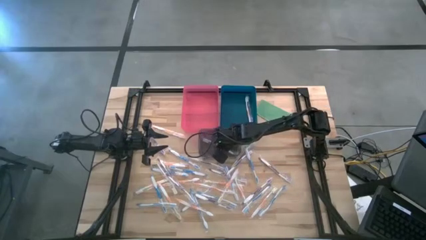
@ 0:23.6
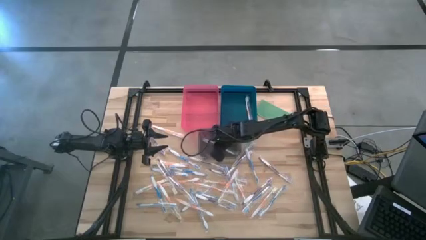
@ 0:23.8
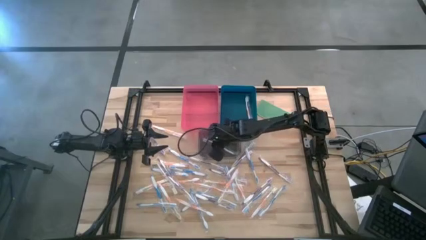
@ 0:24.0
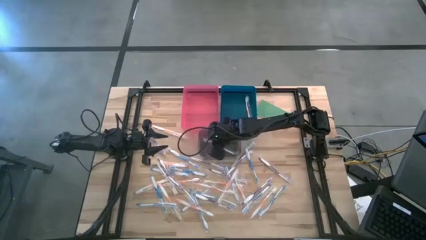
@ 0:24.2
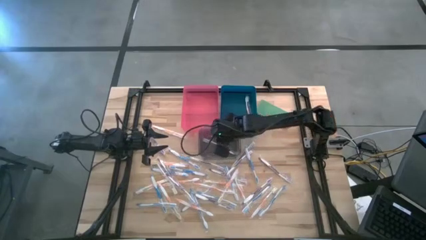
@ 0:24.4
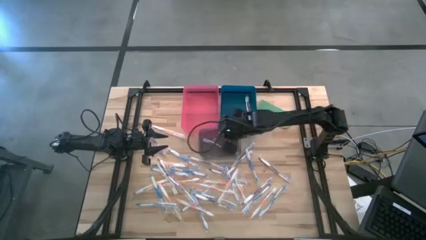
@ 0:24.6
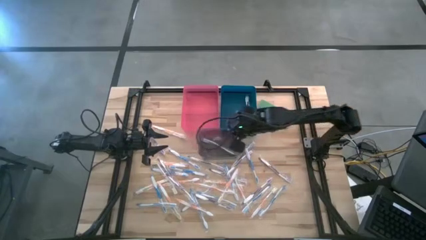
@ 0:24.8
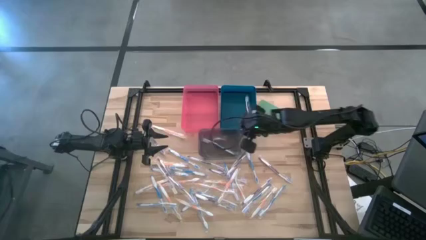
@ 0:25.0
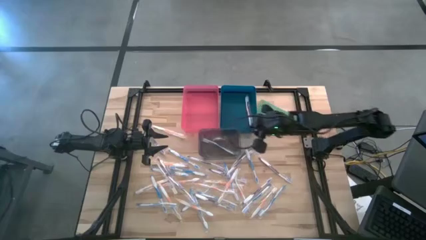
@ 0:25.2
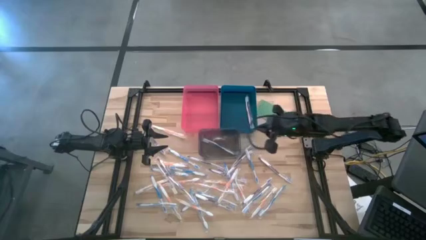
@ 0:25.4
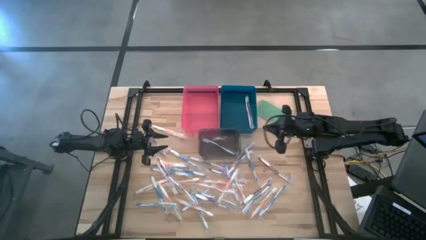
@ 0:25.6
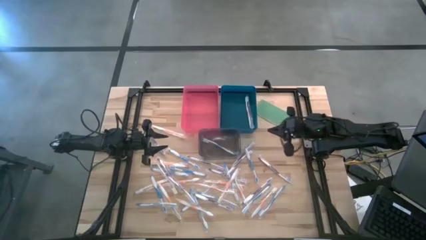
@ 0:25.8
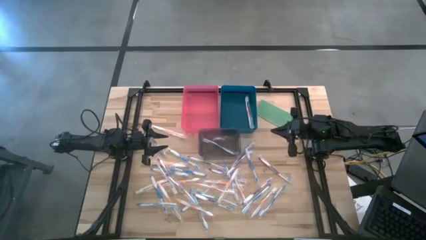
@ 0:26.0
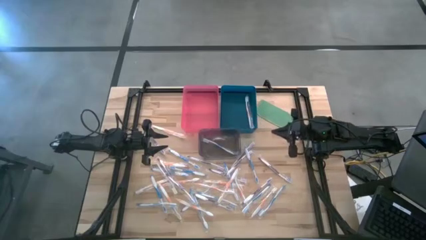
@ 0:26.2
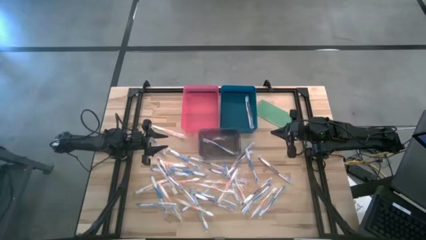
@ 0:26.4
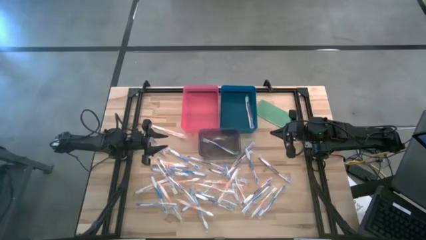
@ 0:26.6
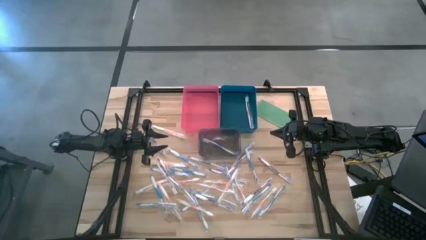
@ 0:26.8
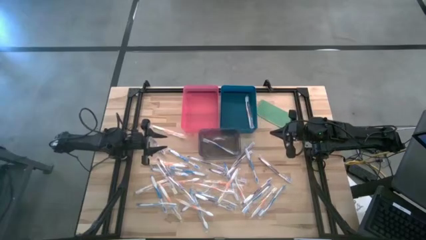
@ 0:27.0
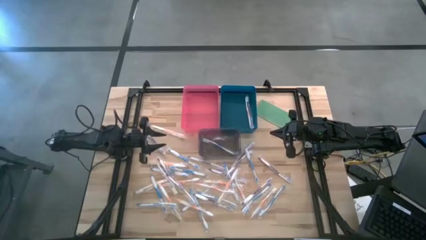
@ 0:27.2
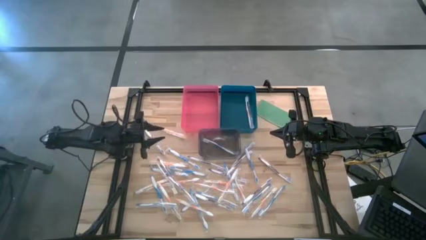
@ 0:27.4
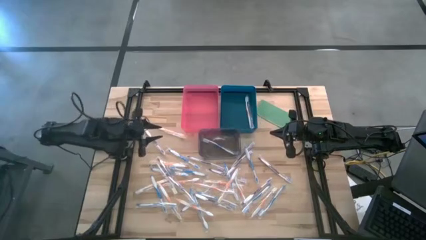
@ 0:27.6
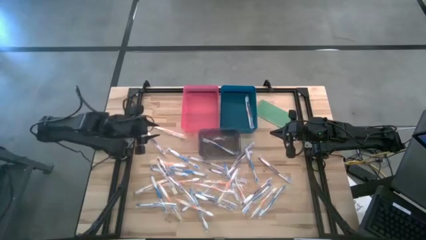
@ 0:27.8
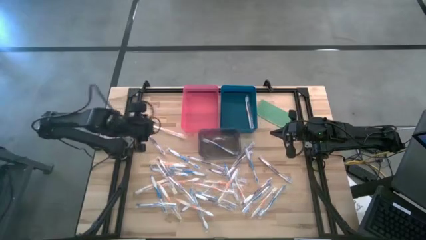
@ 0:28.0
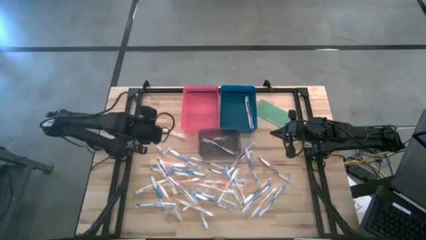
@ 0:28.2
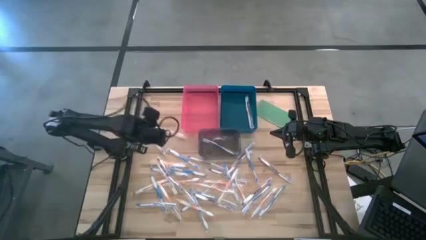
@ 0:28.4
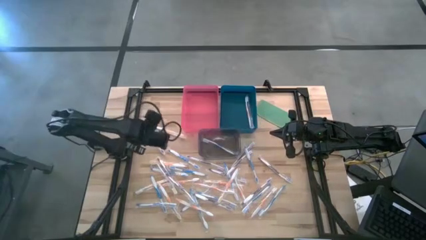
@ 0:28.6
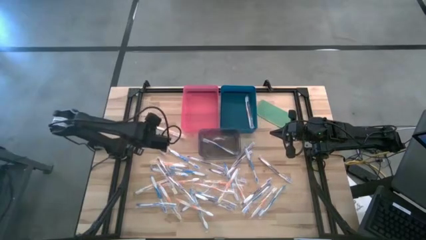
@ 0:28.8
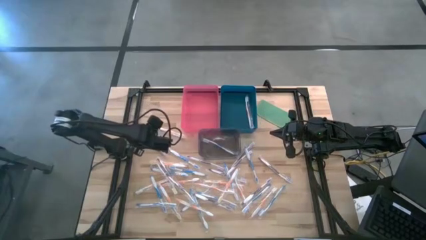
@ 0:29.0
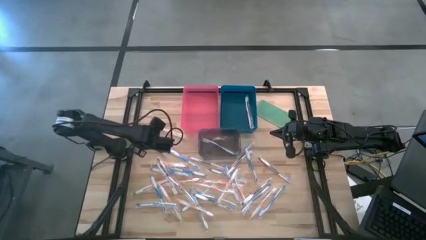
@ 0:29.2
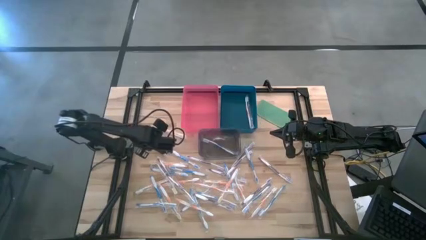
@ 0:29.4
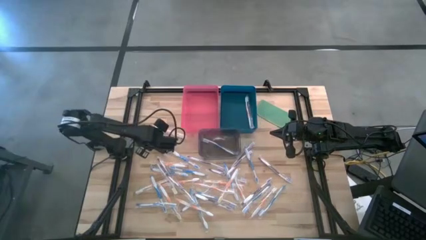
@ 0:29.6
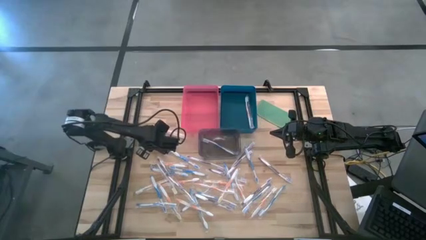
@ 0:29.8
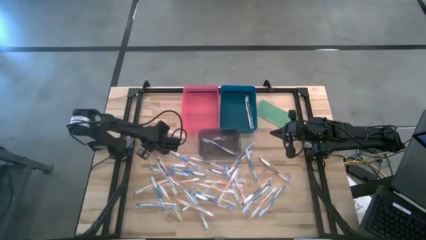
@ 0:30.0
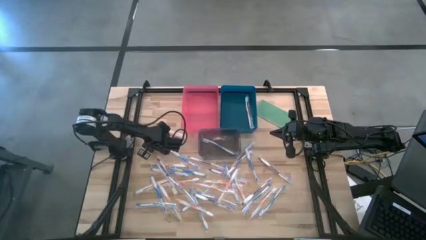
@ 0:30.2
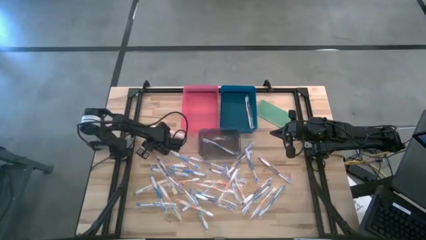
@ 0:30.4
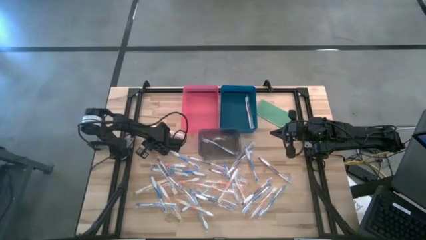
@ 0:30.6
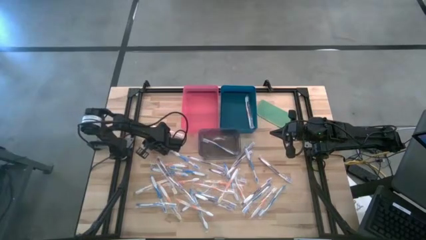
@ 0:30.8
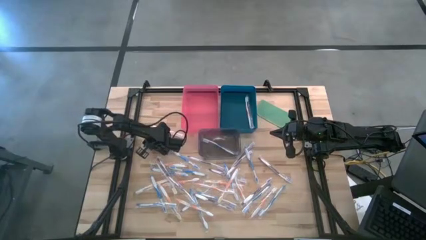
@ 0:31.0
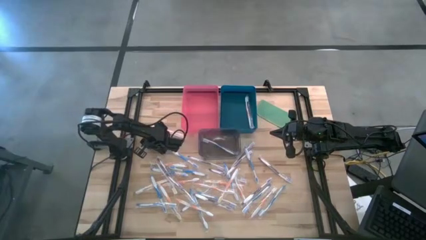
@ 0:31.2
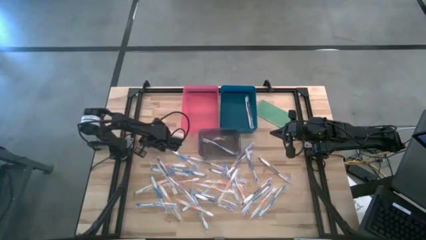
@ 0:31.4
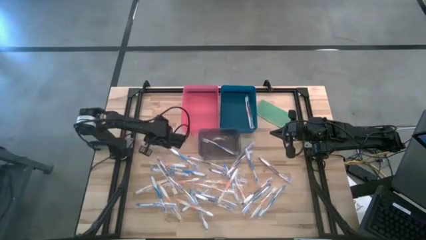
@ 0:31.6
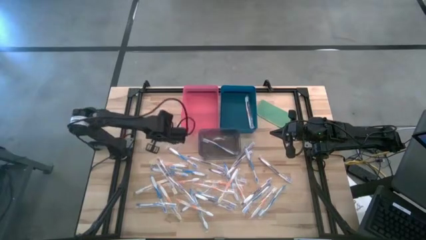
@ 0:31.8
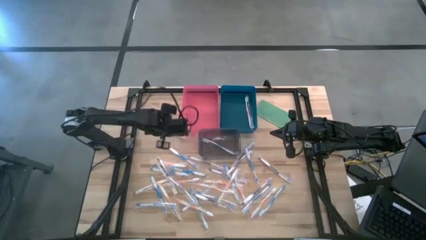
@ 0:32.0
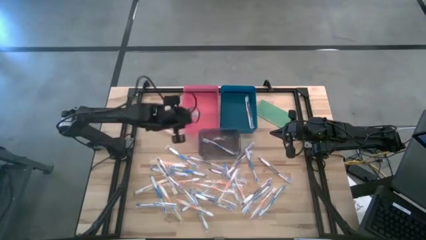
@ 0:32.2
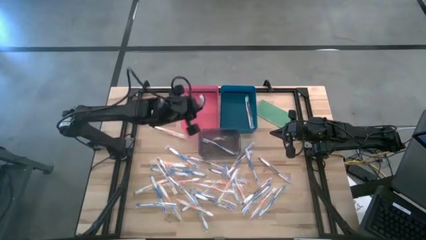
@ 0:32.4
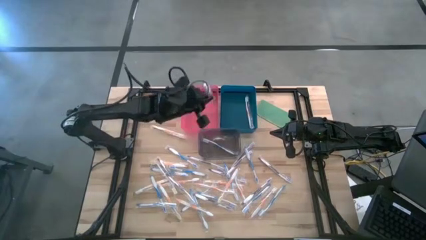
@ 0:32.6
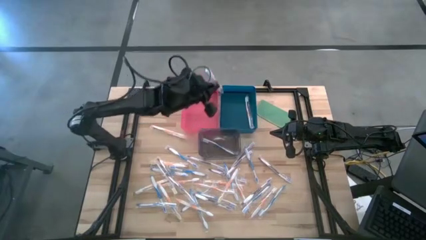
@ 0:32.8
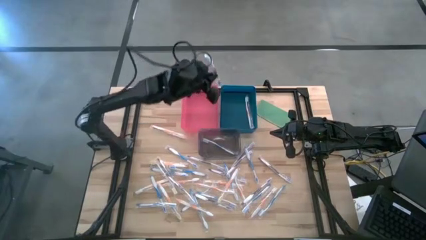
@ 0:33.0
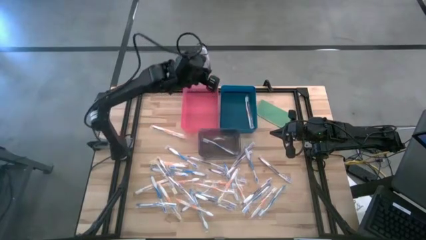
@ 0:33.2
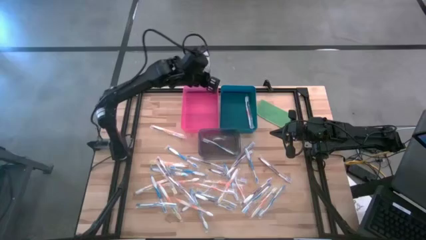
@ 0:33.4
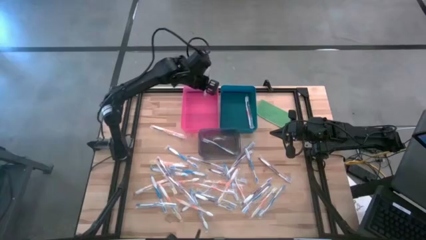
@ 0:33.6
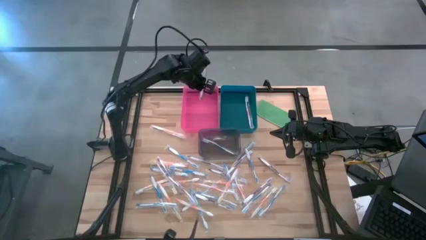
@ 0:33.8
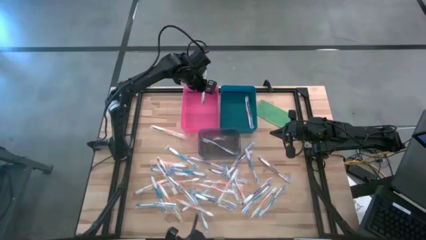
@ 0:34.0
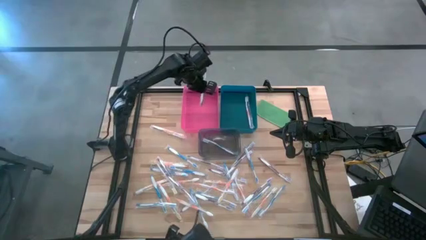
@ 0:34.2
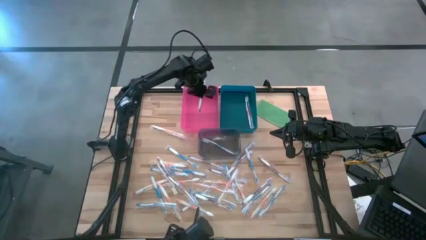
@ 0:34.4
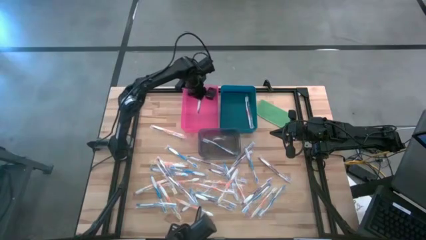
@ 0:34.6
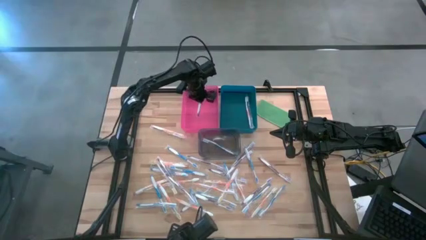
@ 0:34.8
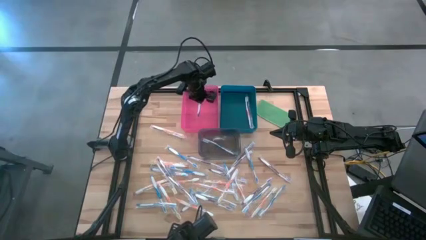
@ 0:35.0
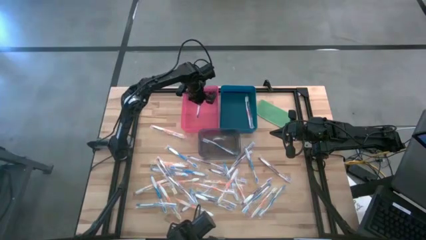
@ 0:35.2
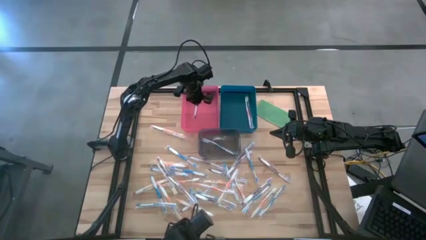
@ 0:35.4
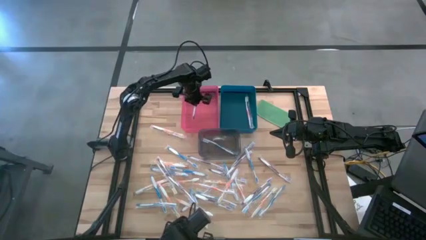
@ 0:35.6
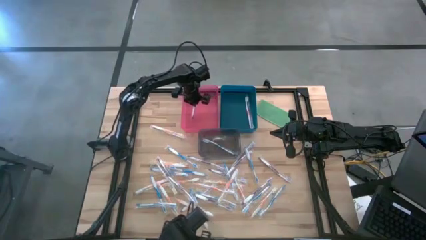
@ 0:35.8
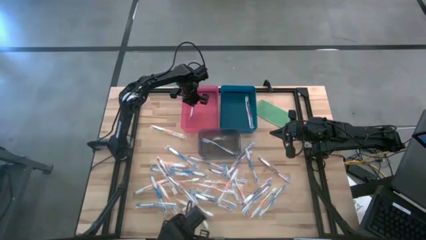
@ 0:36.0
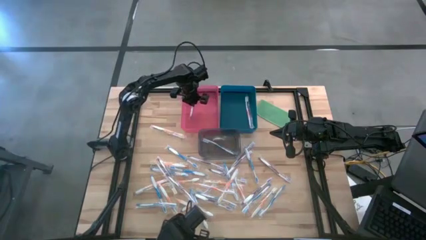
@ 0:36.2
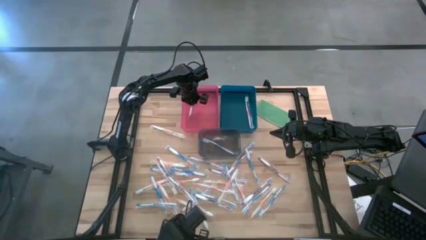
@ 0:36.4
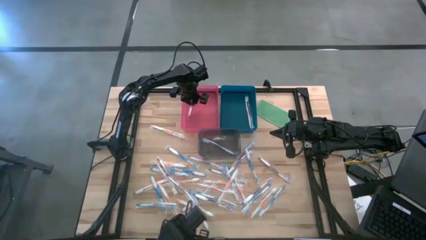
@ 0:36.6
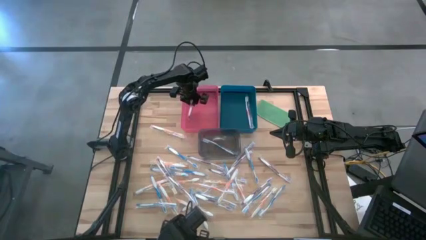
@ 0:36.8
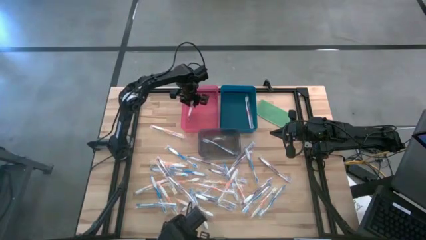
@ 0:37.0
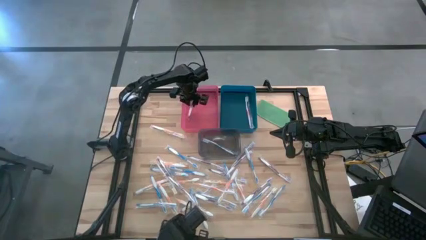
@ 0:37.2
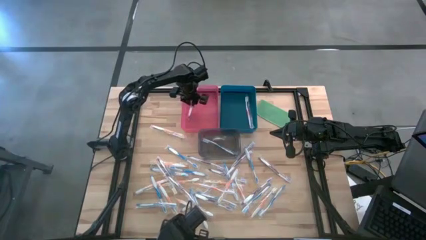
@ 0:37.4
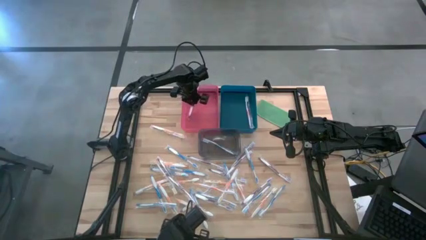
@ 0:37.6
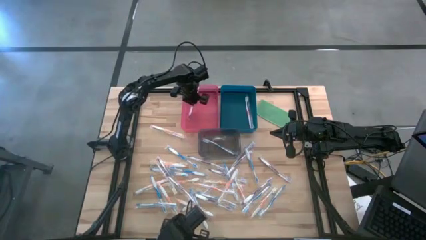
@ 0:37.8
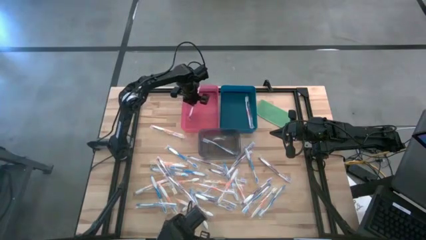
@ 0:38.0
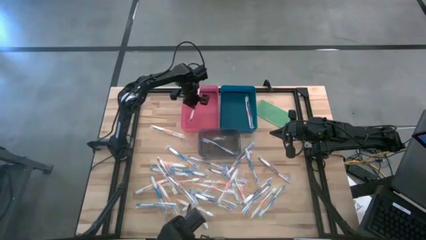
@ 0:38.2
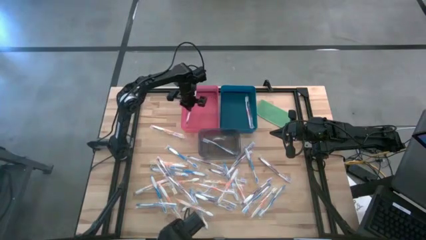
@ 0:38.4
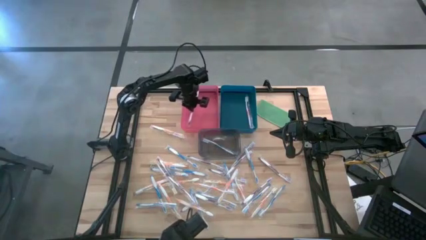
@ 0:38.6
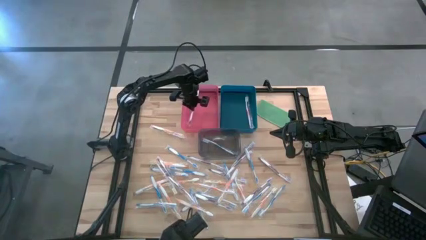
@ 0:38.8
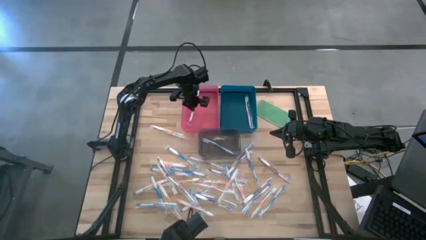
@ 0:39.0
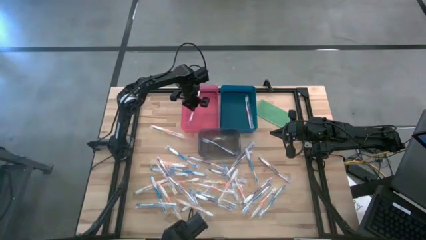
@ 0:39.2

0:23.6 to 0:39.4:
Task: Pick & Place Toothbrushes
Put the purple toothbrush into the pink bin

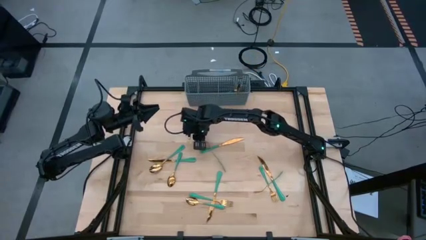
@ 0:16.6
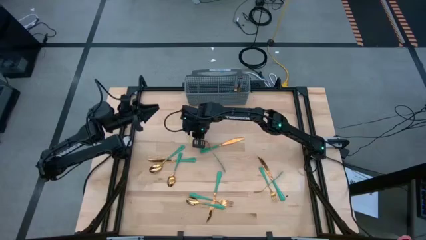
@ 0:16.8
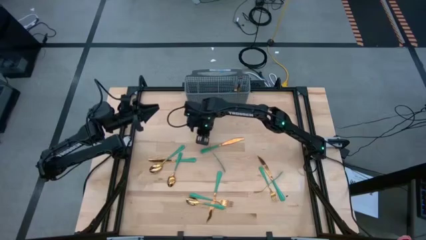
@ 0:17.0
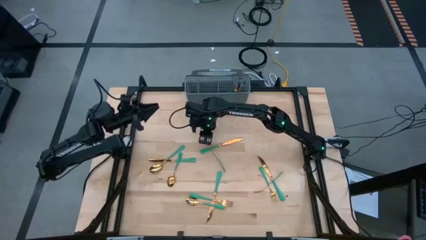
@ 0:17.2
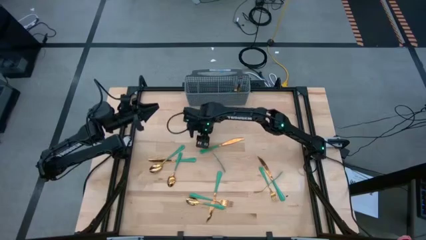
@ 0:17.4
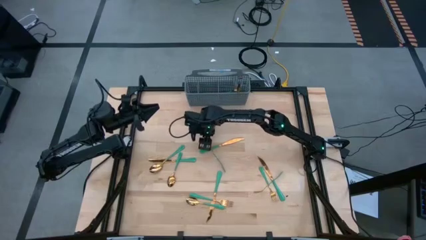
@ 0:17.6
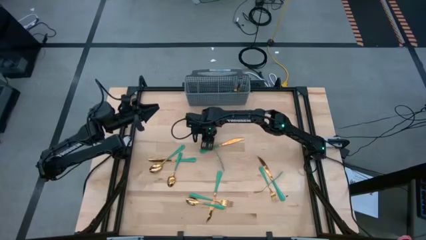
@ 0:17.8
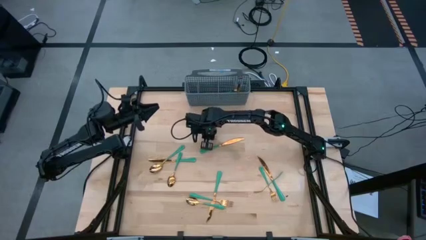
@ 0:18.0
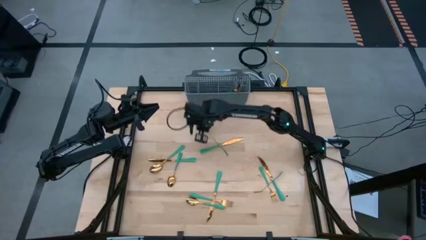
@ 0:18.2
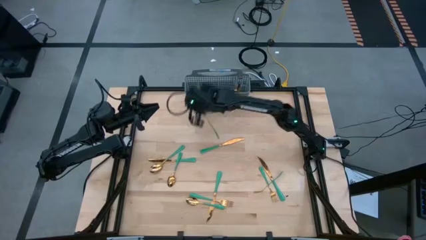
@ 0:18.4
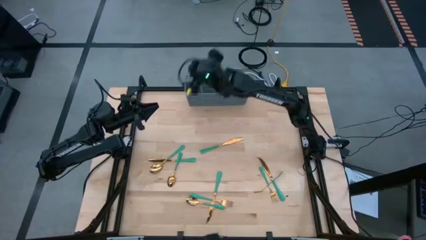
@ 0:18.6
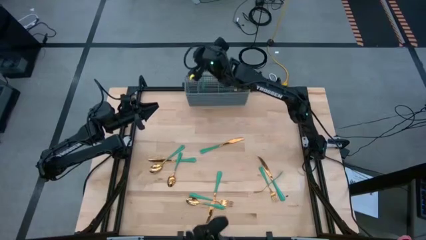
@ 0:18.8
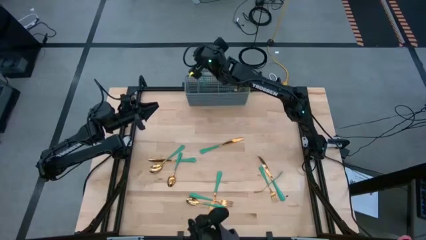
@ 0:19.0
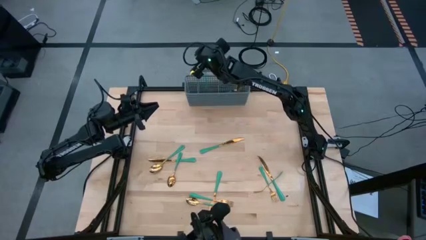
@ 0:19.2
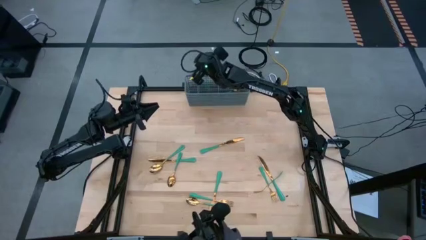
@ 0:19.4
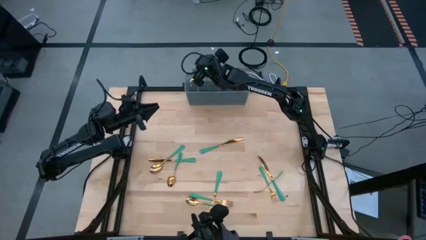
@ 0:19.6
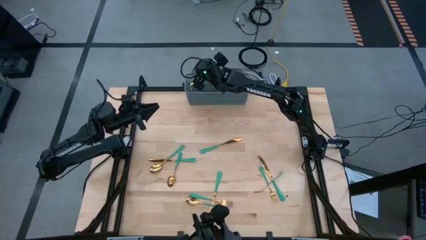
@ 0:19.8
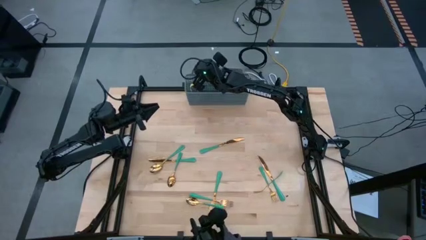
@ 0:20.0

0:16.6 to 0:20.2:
Task: Sort silverware
Put the green fork into the gray silverware organizer
